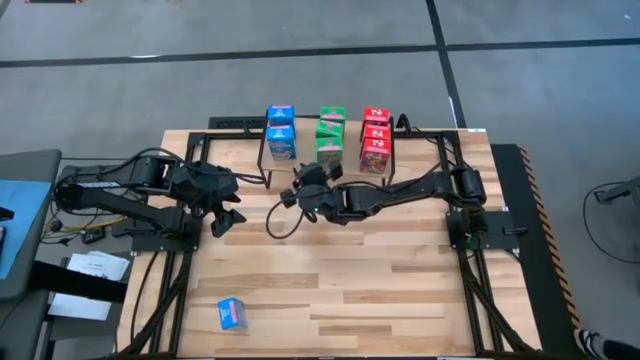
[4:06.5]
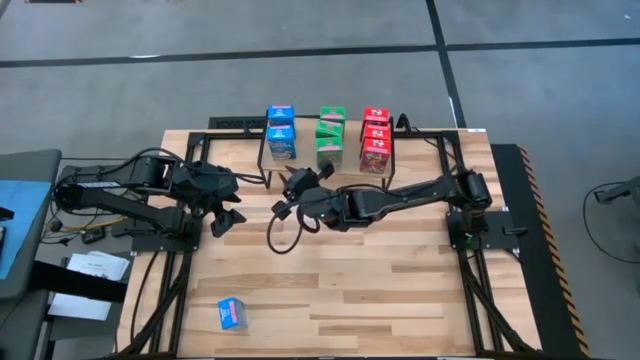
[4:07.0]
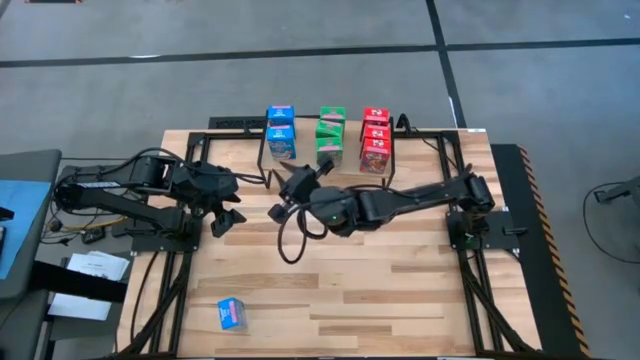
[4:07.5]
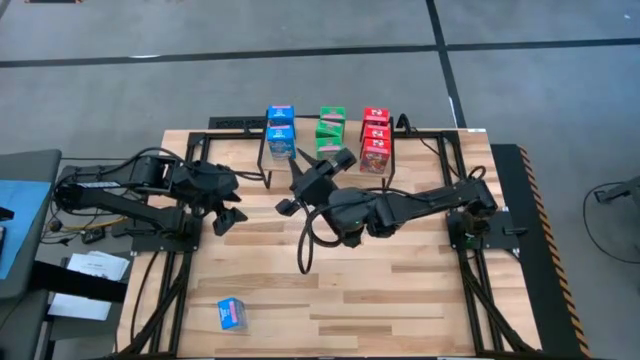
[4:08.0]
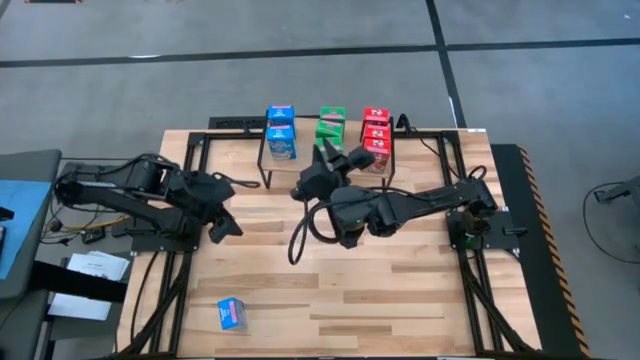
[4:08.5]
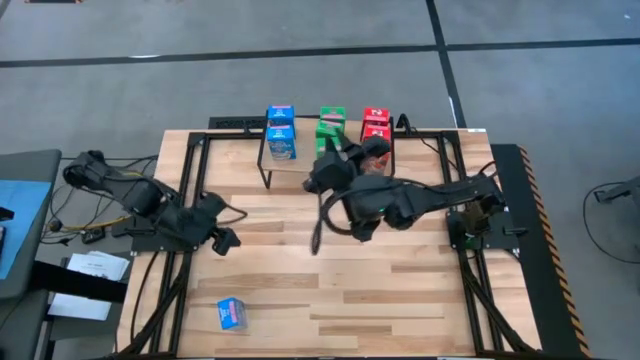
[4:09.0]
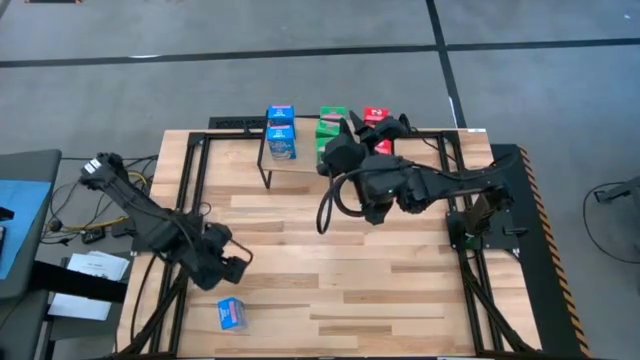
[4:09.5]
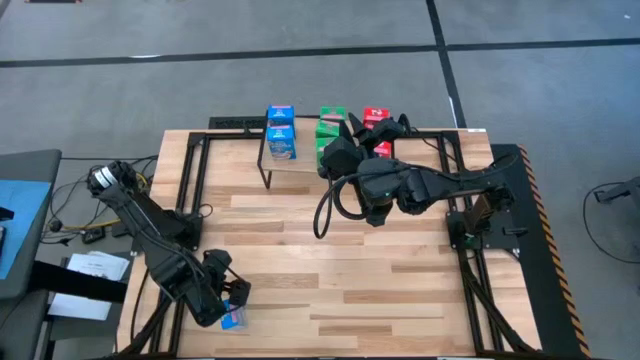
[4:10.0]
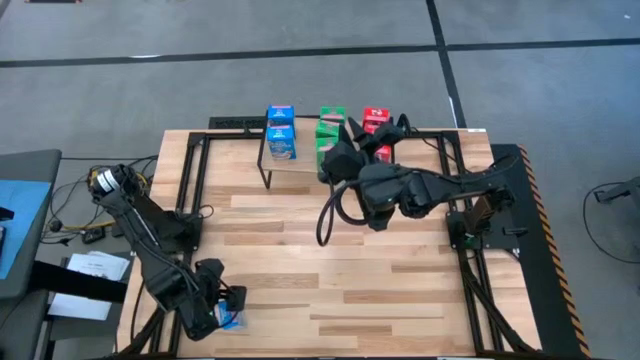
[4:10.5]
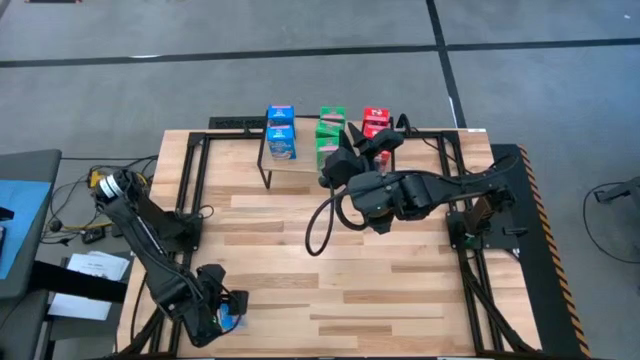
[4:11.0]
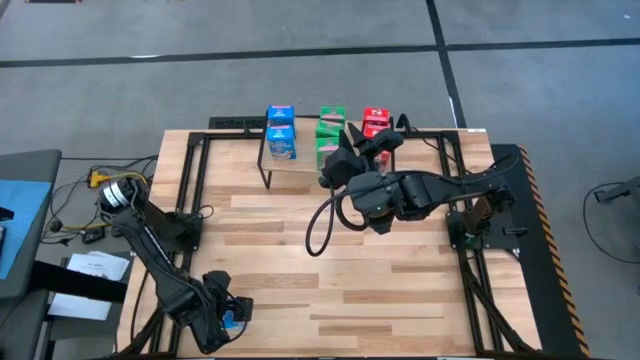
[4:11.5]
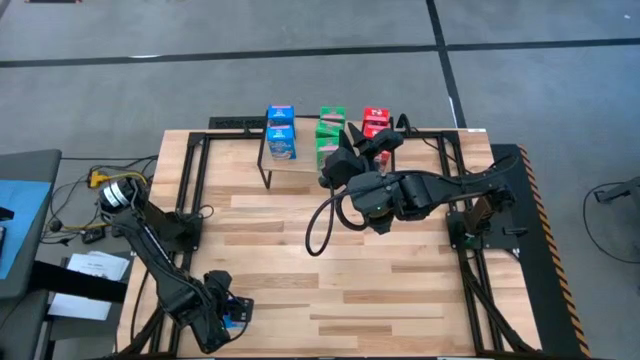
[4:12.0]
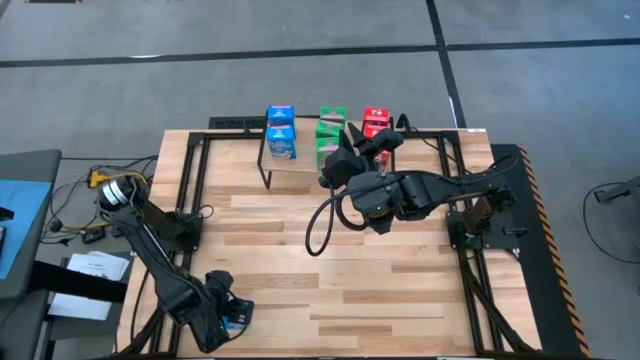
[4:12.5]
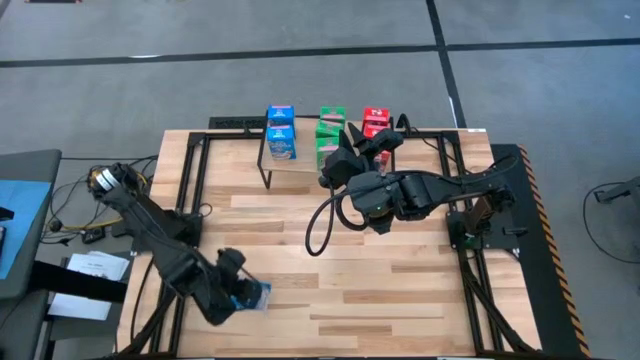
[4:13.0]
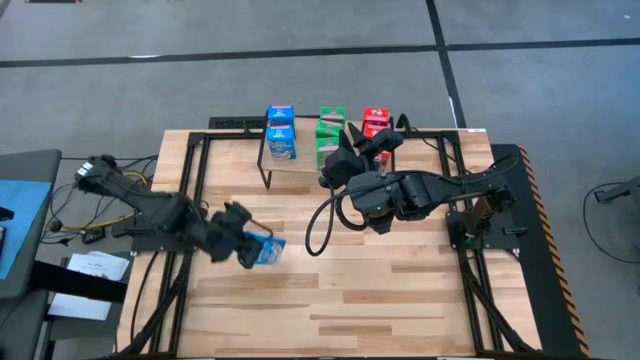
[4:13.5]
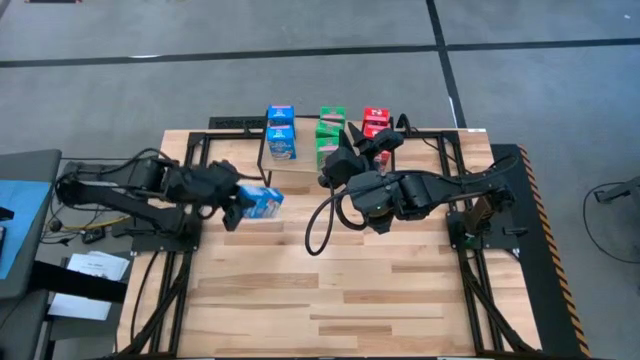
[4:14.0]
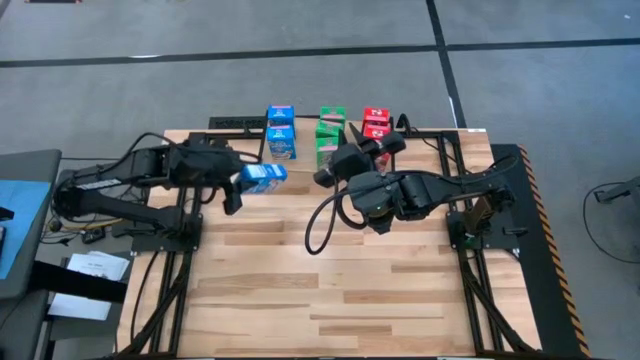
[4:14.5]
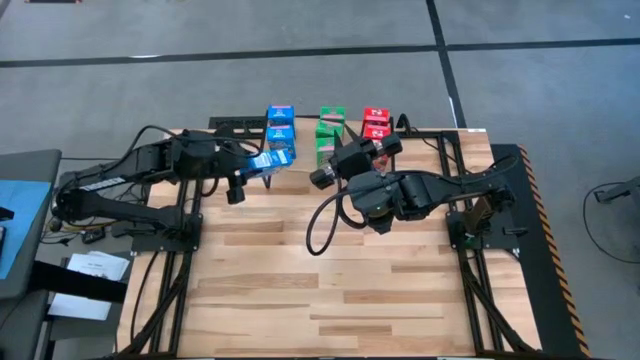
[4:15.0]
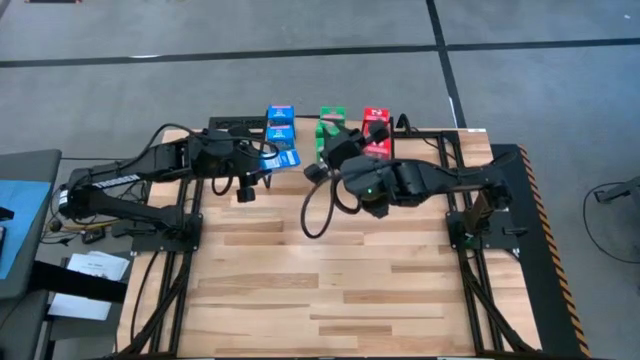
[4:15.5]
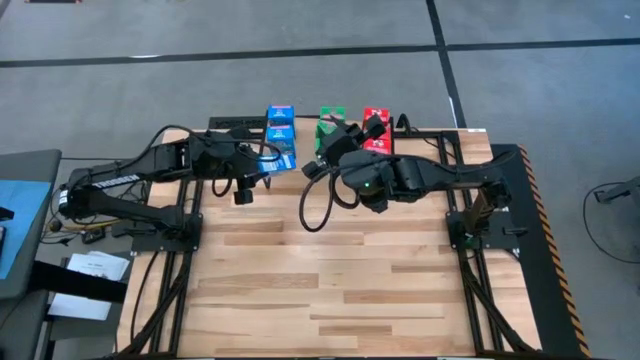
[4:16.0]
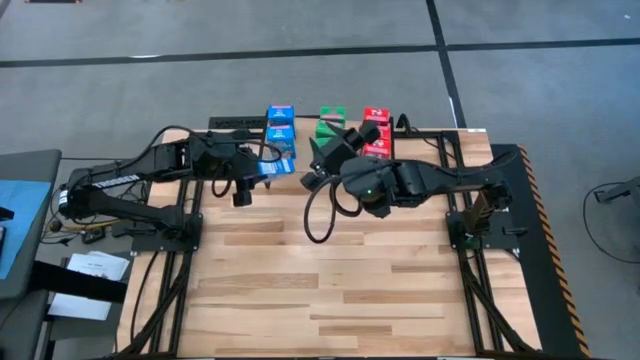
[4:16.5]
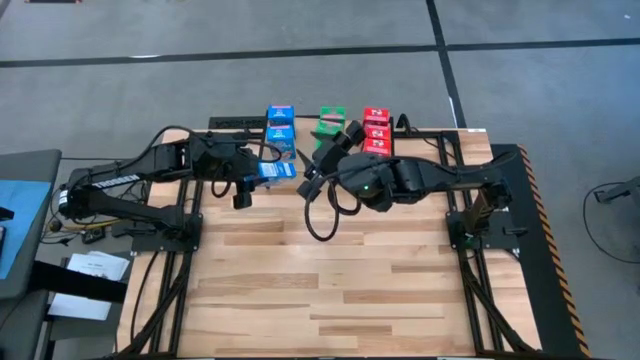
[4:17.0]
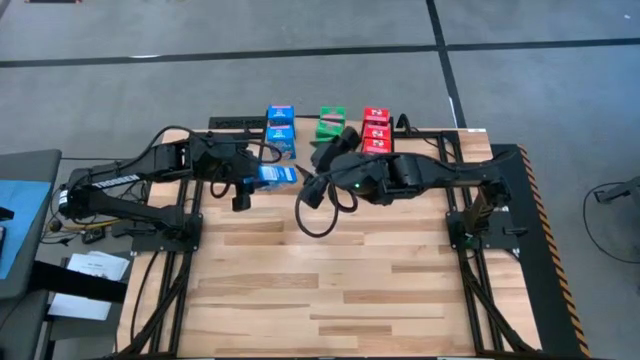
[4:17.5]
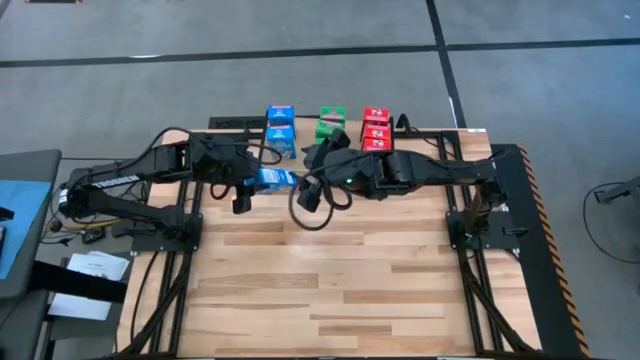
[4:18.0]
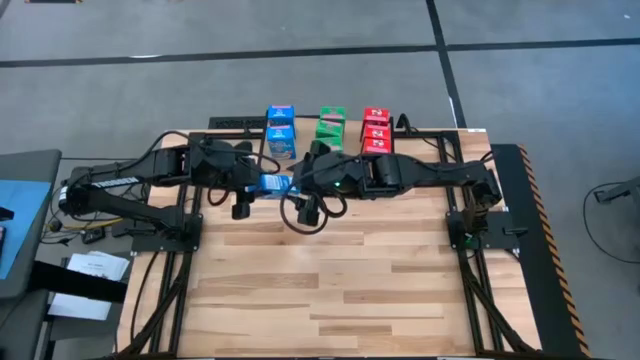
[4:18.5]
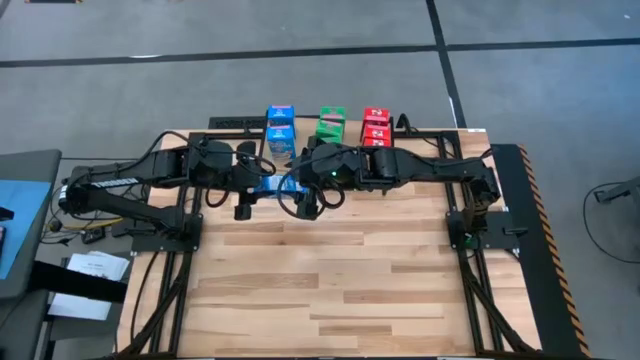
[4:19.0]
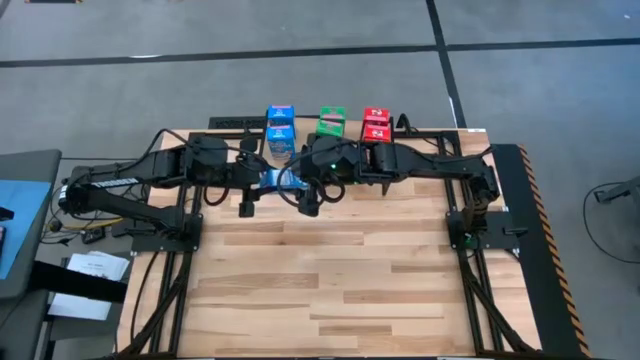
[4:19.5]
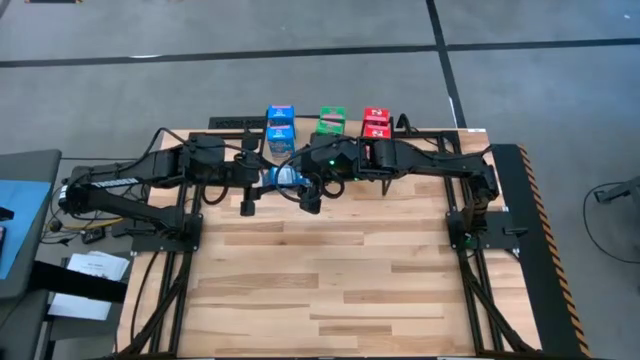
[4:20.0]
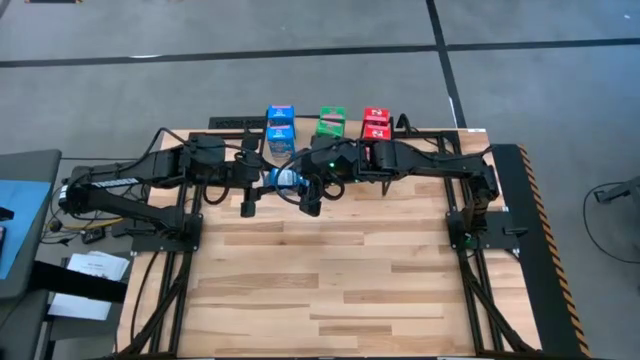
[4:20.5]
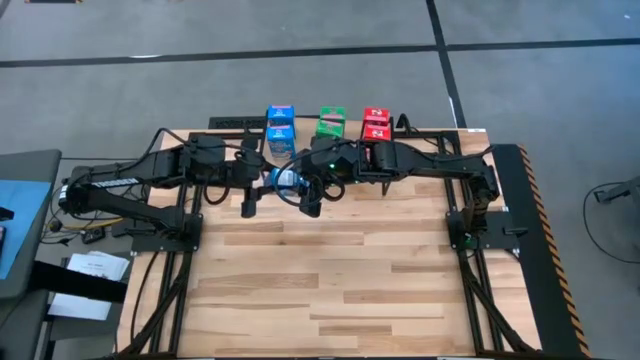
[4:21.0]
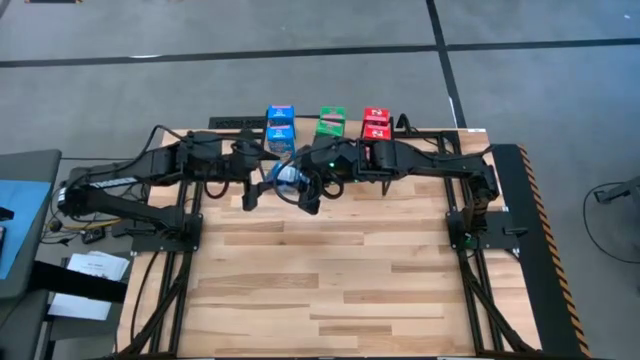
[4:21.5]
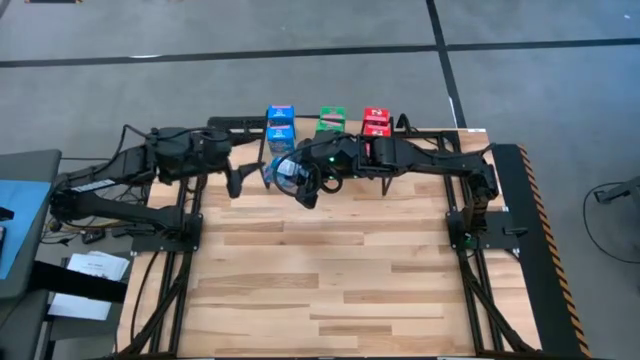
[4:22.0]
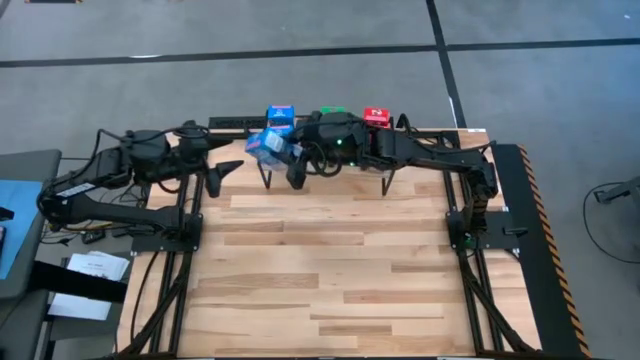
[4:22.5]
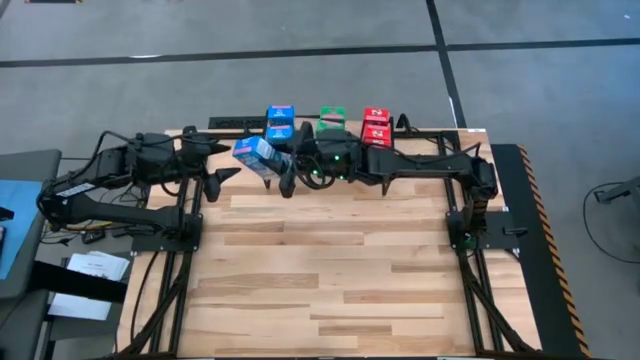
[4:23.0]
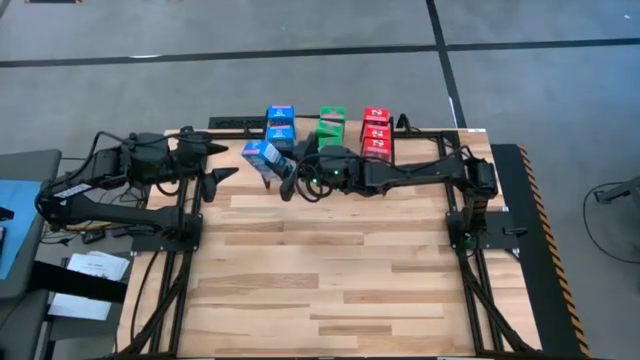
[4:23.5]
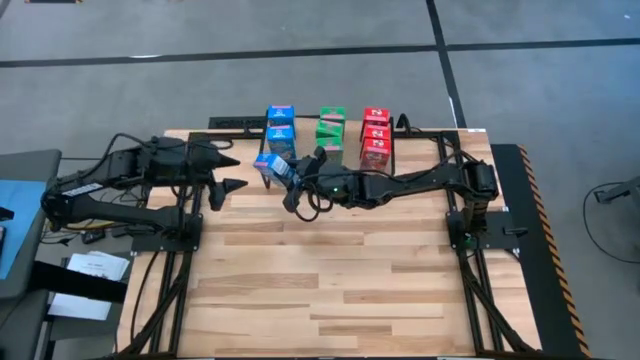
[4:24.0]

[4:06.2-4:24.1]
Task: Stack cereal on shelf
Put the blue cereal box on the shelf aligned with the other blue cereal boxes

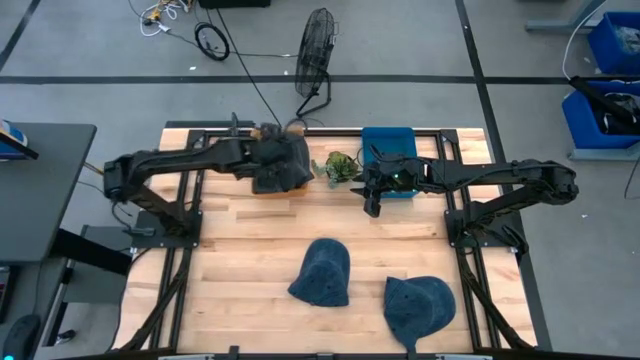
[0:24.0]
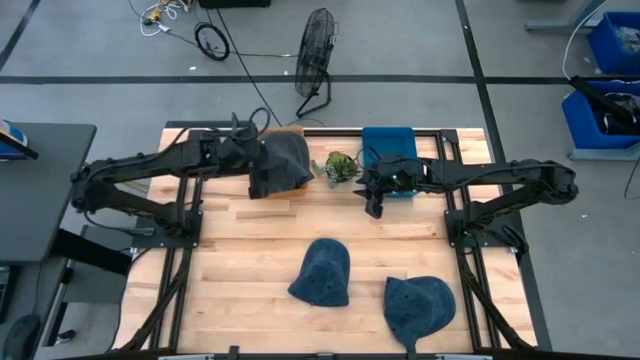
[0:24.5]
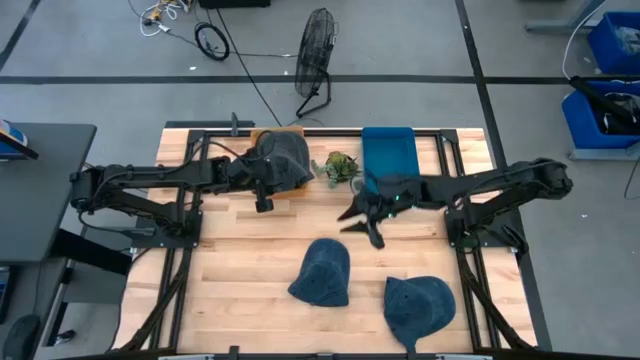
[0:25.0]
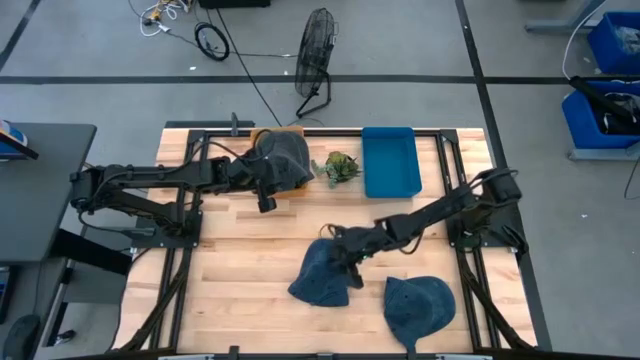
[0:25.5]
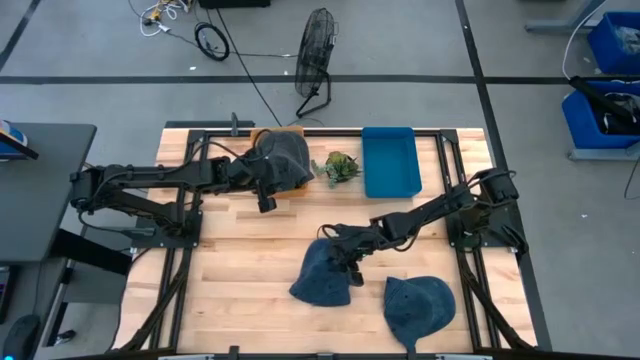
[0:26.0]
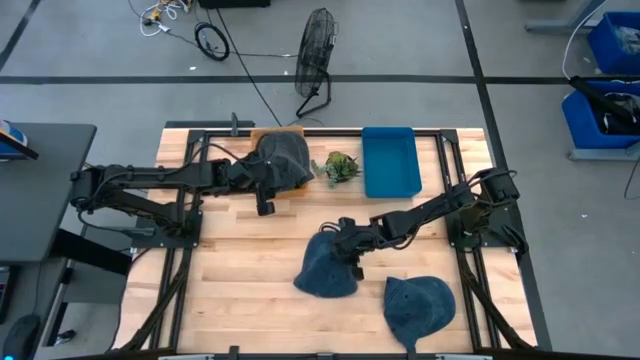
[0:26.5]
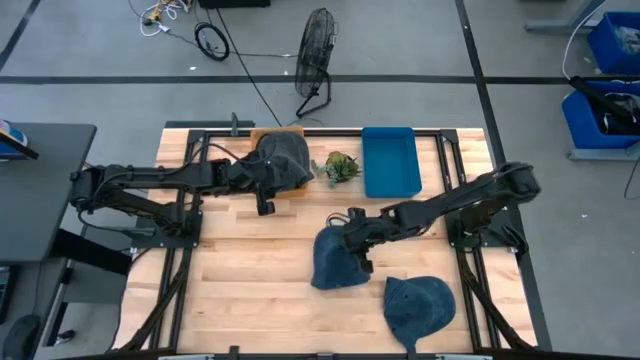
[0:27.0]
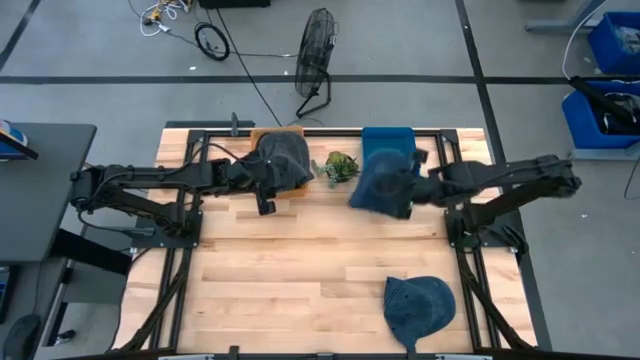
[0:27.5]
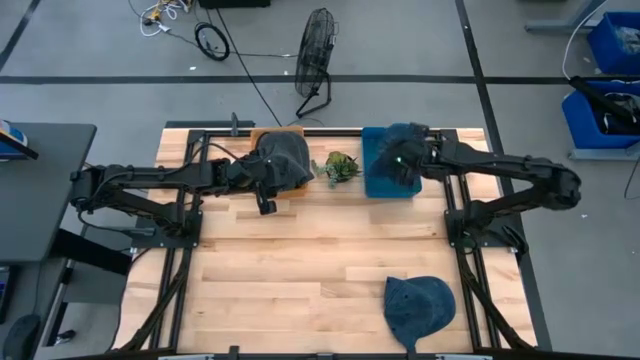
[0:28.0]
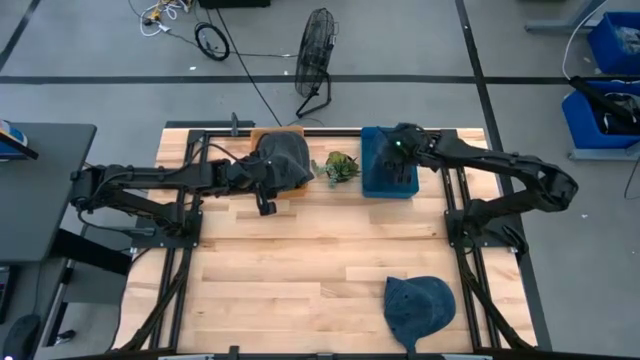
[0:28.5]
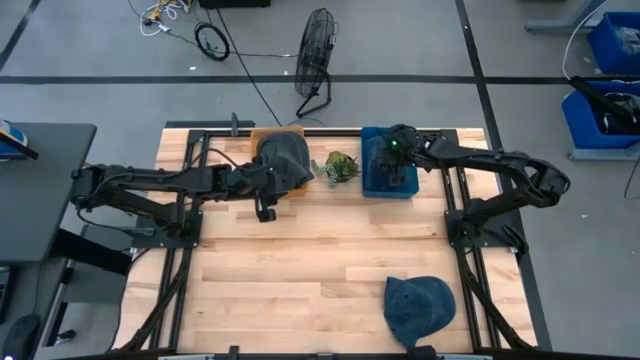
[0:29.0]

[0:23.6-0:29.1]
Task: Pick & Place hat
Put the left blue cap into the blue bin
